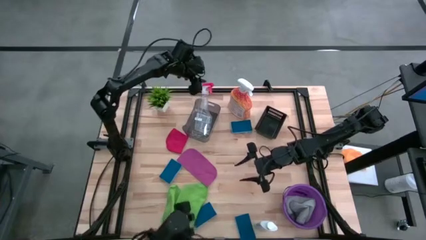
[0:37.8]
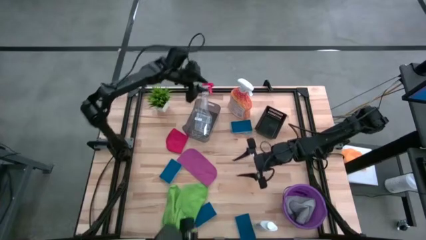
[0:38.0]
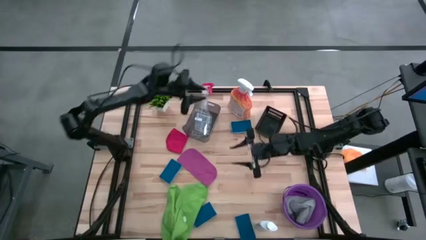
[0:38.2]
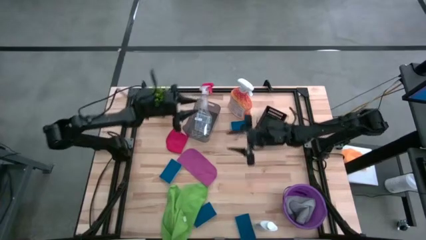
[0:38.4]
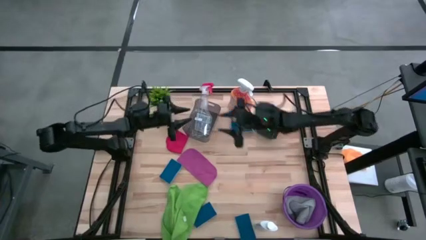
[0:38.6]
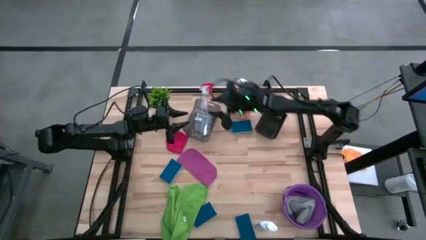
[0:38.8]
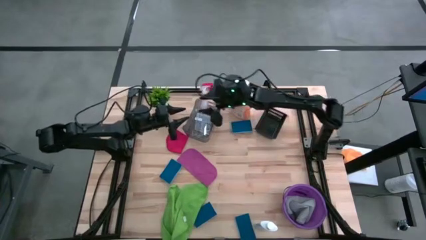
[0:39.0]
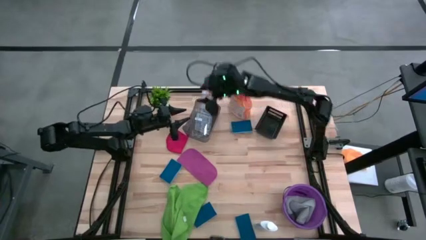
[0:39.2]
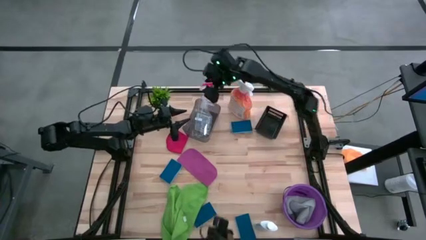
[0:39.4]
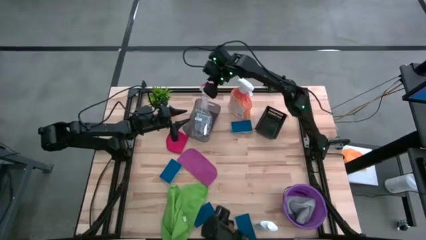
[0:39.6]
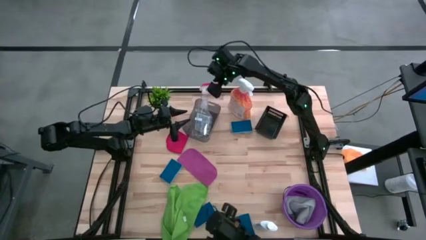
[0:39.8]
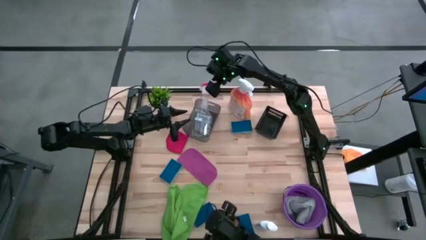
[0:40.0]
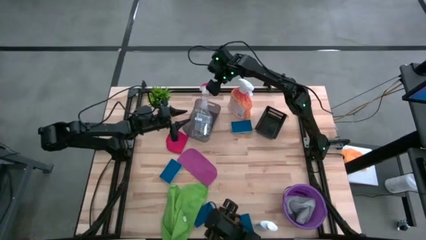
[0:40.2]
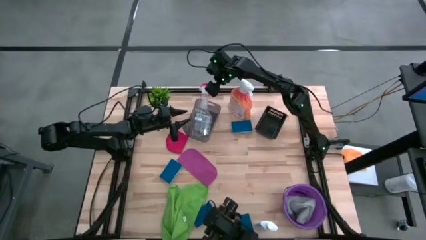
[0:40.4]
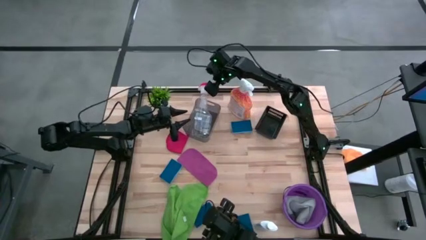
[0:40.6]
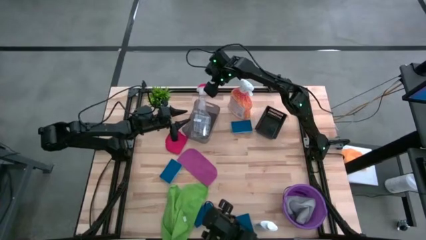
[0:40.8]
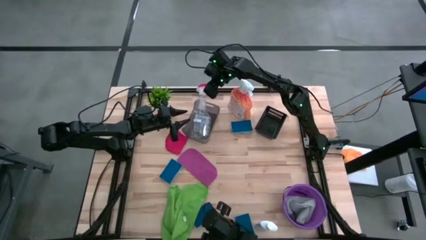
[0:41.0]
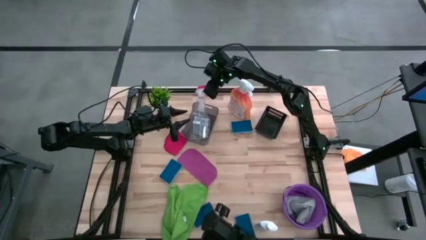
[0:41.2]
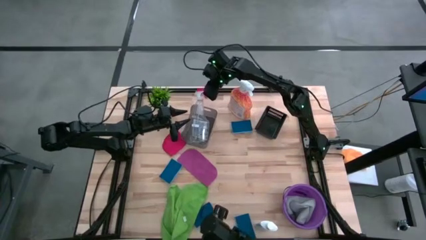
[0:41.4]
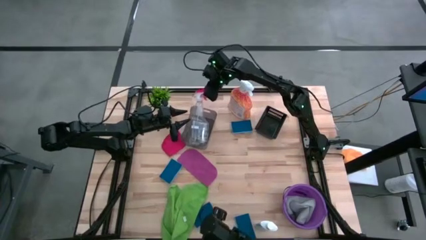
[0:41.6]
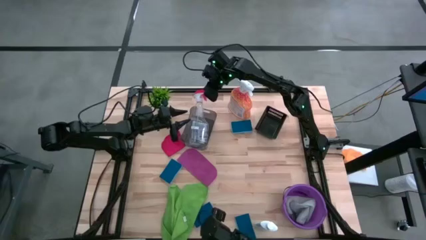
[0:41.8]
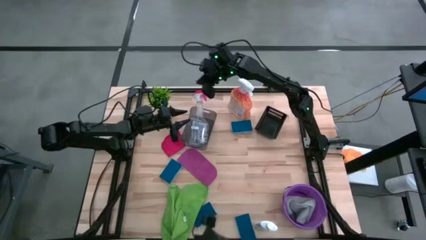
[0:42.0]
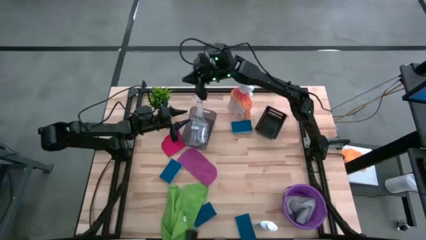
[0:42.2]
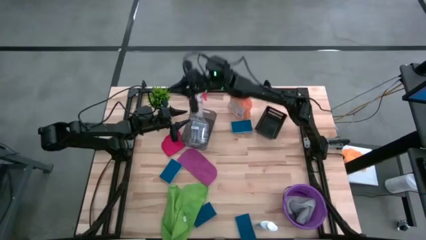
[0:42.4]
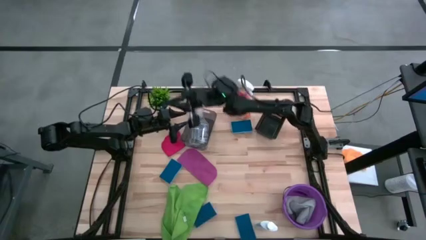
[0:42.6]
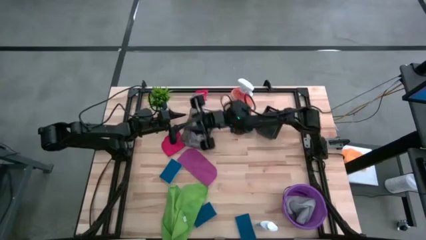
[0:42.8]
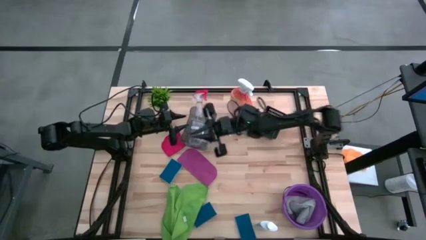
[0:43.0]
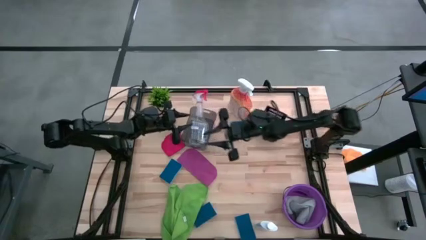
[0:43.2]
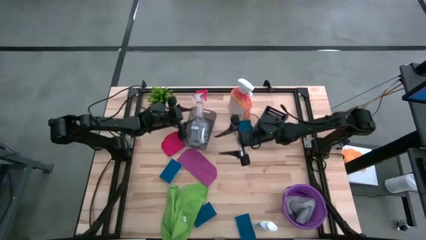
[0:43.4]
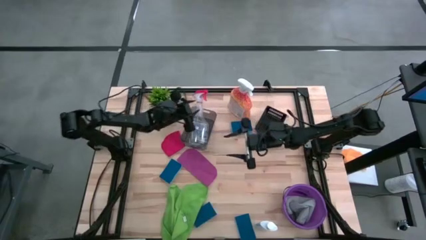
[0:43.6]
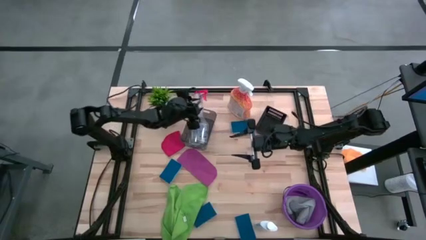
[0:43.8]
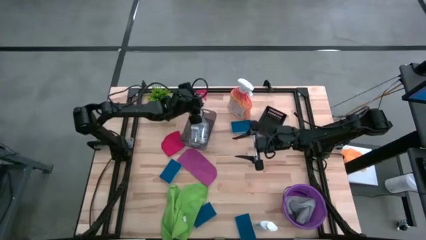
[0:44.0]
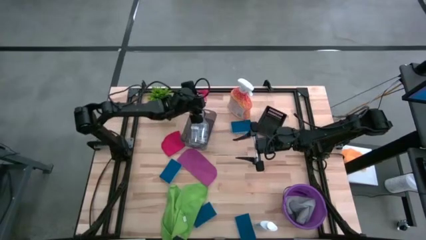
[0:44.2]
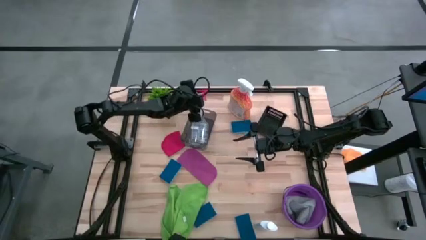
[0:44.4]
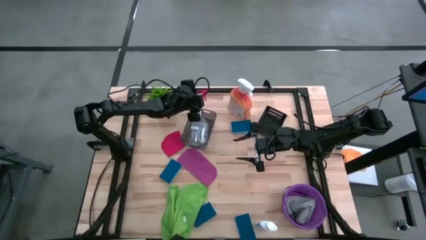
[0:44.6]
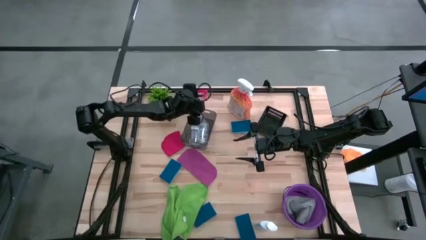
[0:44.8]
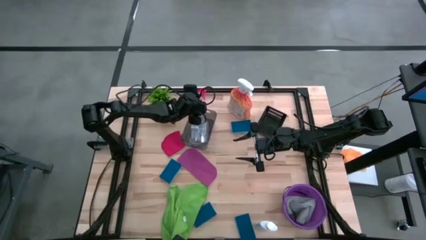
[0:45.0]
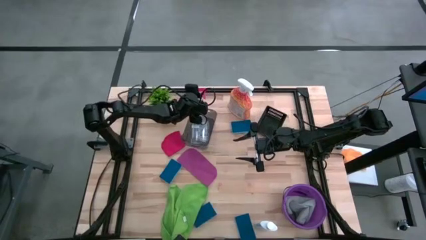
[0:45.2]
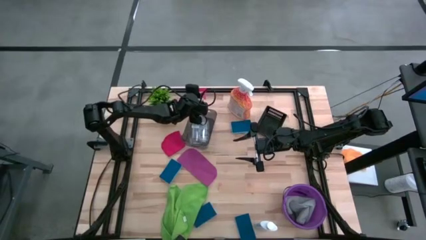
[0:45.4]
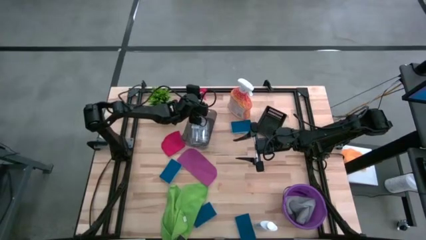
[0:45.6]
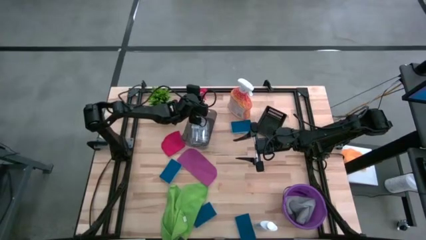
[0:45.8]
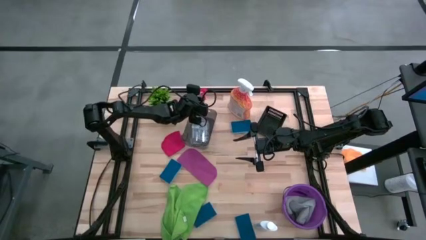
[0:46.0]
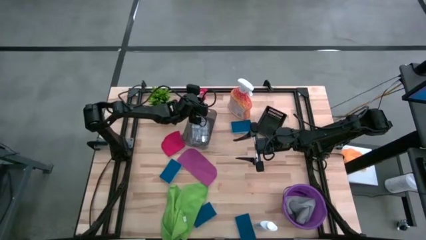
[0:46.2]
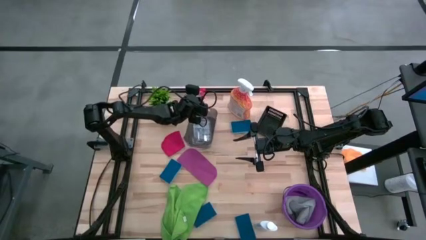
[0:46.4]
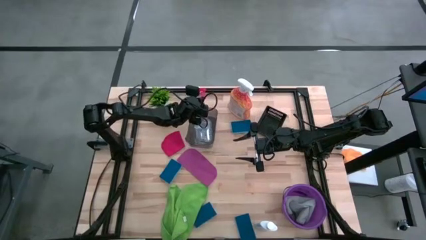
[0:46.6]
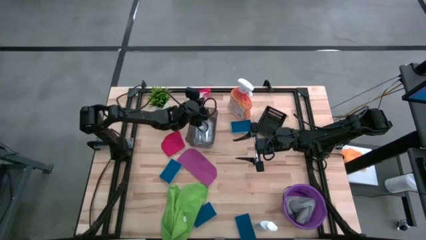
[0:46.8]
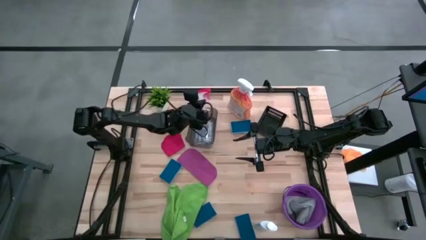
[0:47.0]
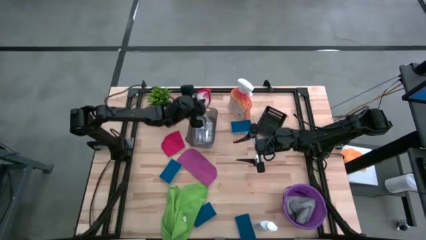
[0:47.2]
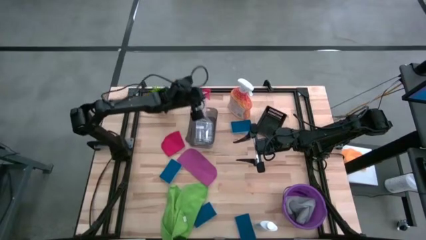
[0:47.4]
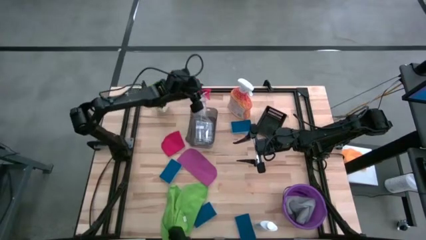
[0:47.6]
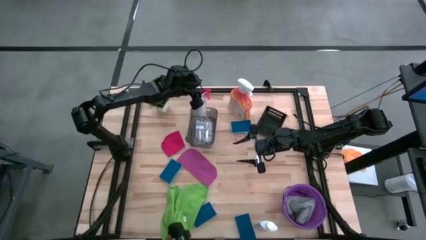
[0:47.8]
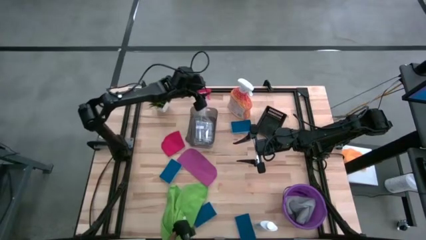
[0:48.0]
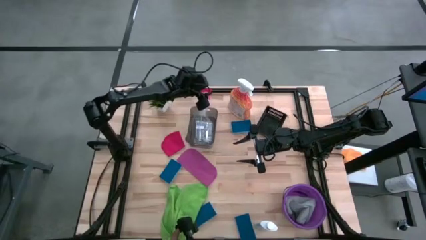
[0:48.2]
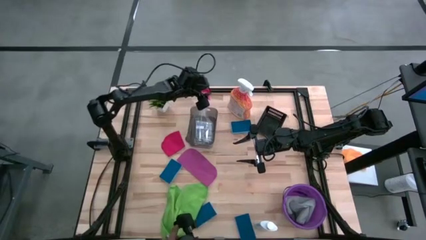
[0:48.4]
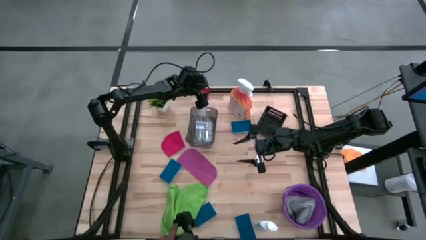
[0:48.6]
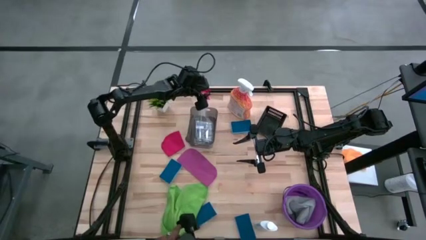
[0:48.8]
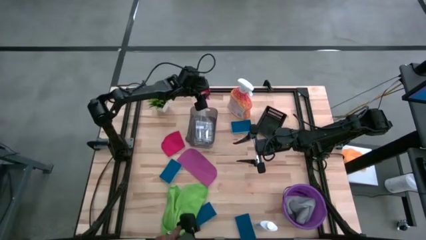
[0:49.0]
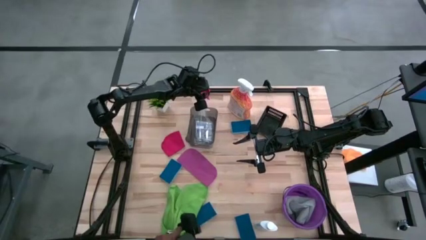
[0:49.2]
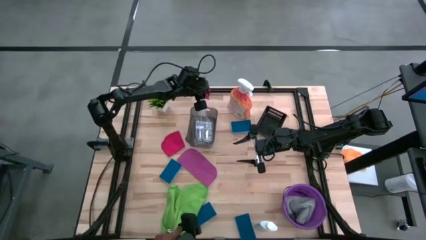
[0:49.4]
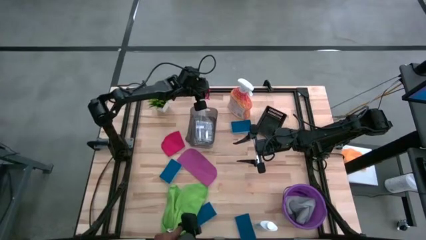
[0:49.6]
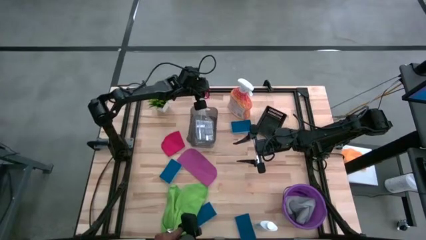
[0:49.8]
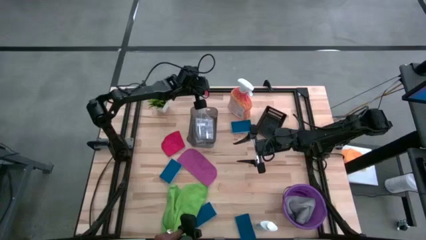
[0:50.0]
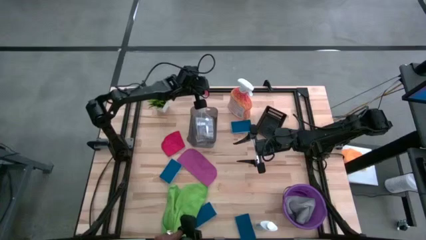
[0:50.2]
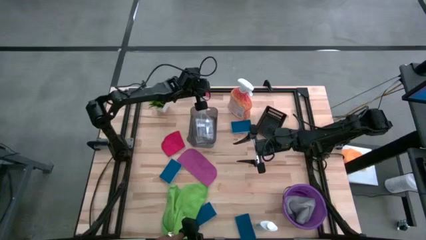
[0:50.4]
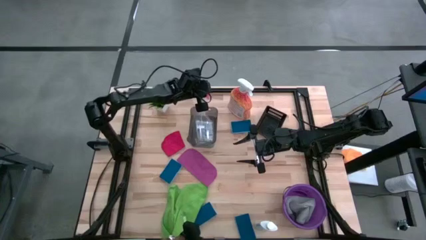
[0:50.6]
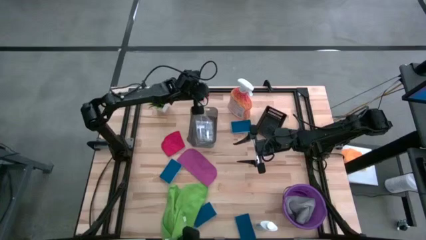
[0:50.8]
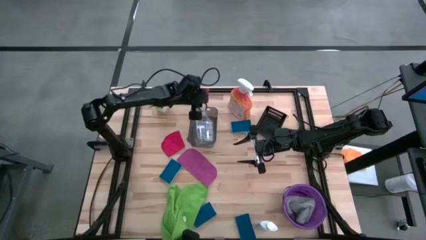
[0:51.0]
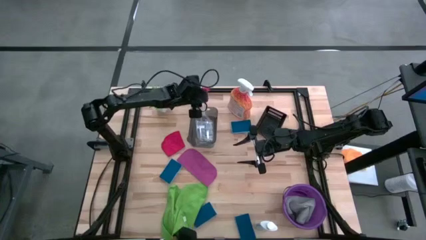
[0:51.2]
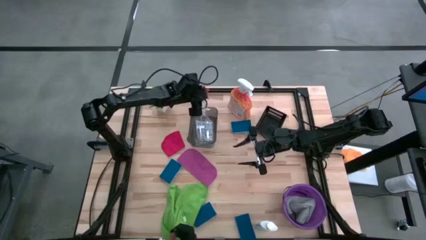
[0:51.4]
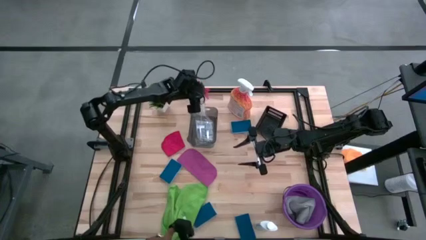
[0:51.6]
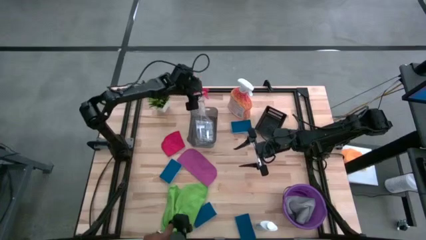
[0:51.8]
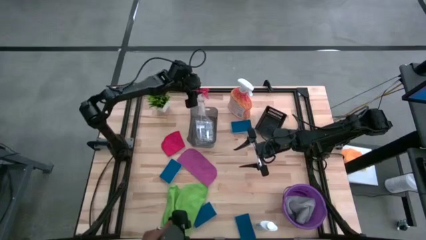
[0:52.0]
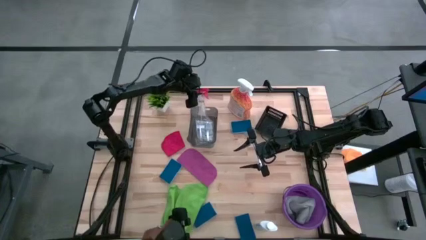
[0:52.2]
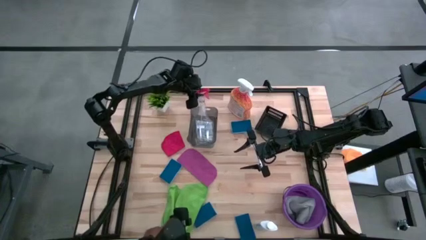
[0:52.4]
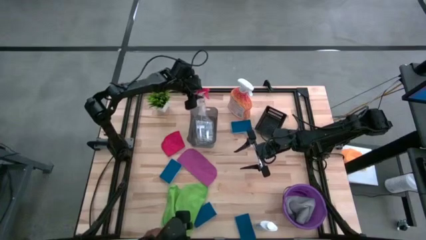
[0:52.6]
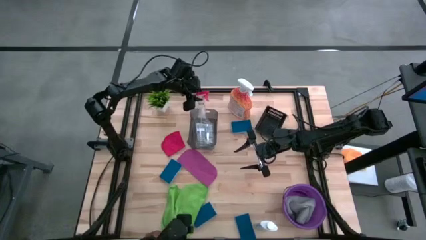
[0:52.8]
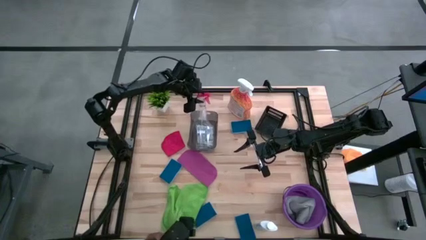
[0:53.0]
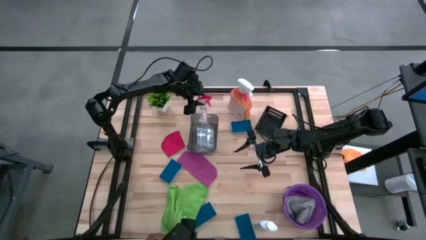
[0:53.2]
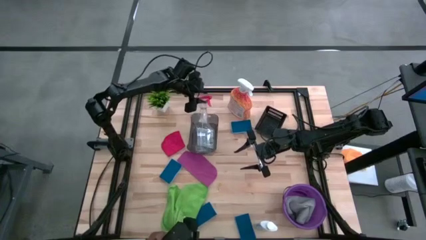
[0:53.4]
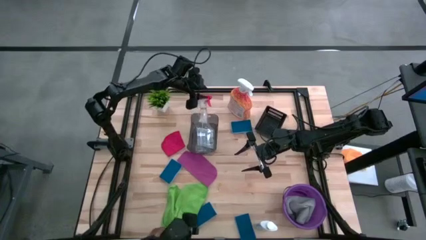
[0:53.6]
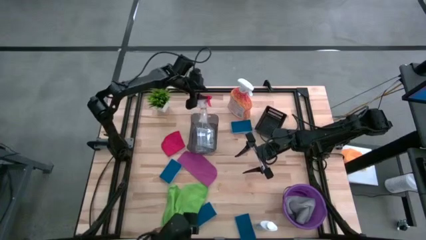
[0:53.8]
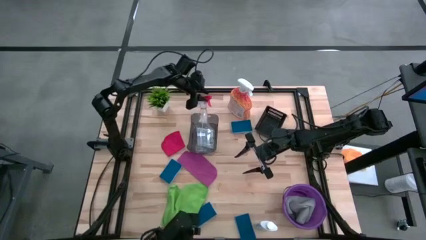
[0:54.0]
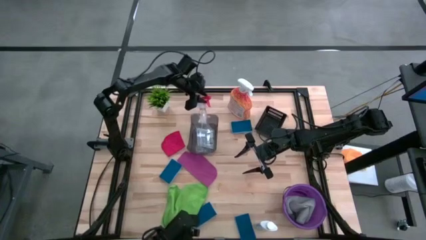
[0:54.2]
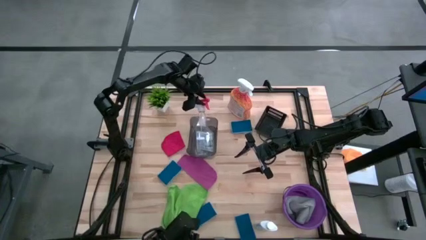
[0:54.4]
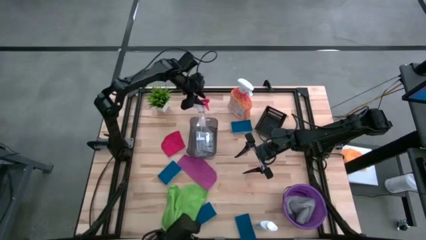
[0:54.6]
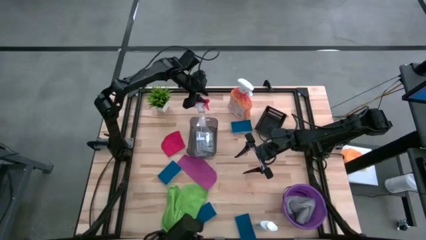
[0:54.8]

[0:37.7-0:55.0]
Task: Pick & Place Kitchen Items
Put the transparent spray bottle into the gray bin
